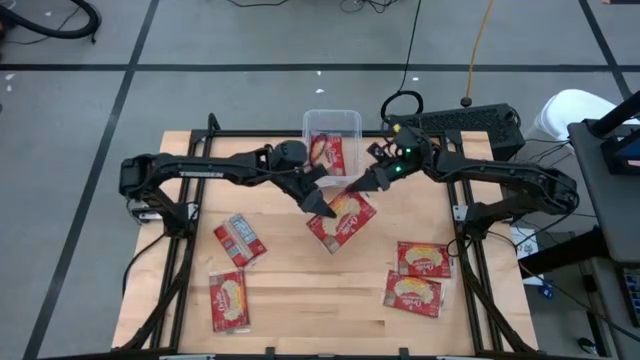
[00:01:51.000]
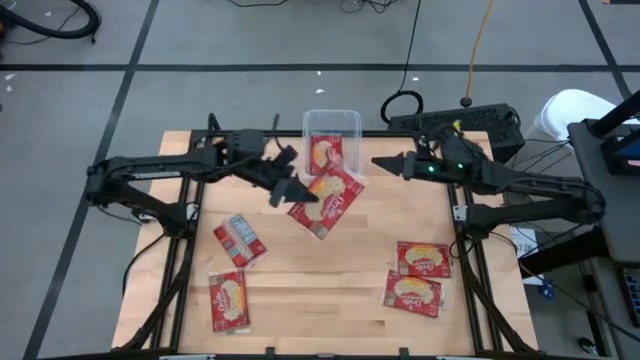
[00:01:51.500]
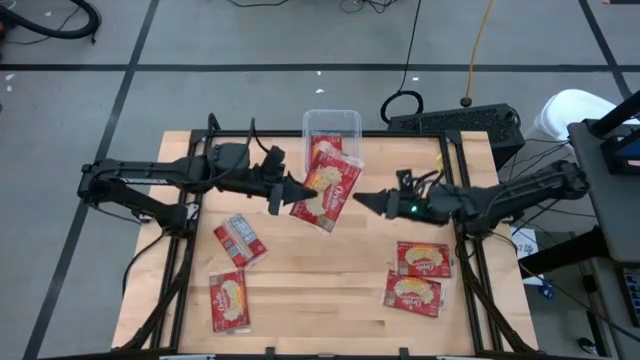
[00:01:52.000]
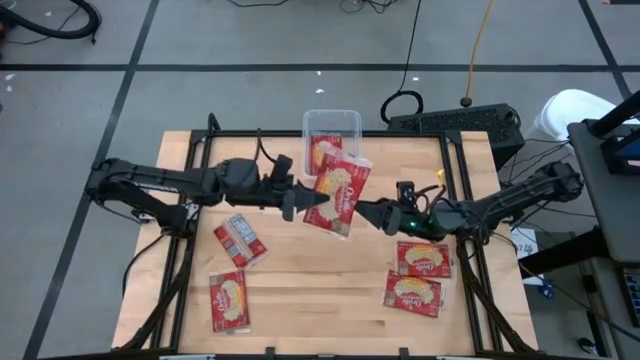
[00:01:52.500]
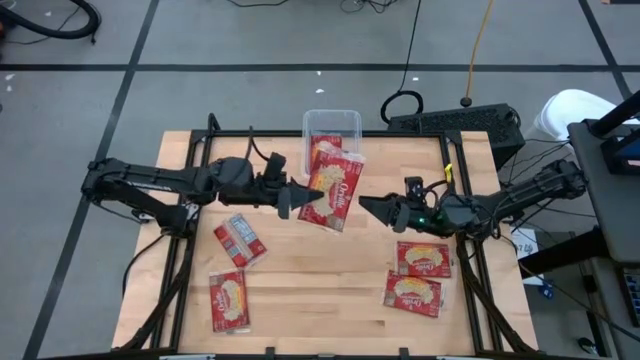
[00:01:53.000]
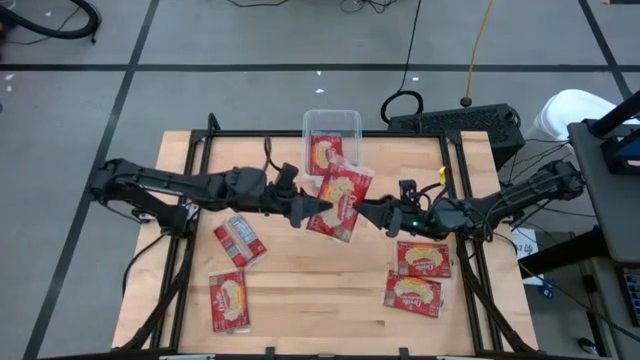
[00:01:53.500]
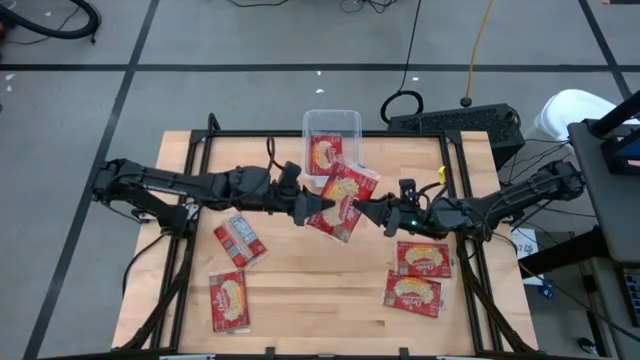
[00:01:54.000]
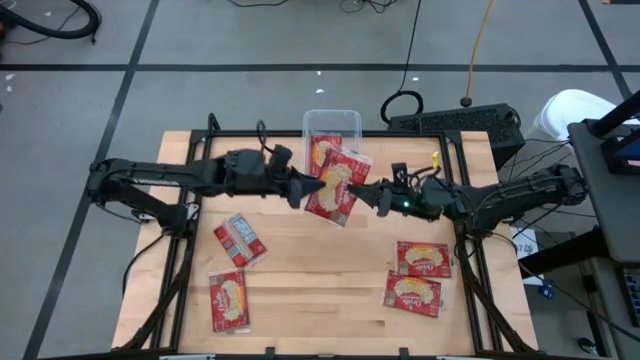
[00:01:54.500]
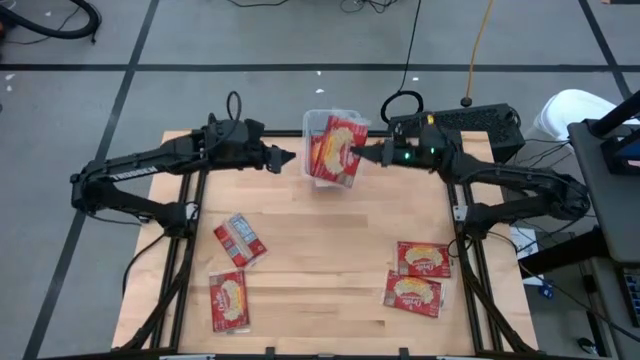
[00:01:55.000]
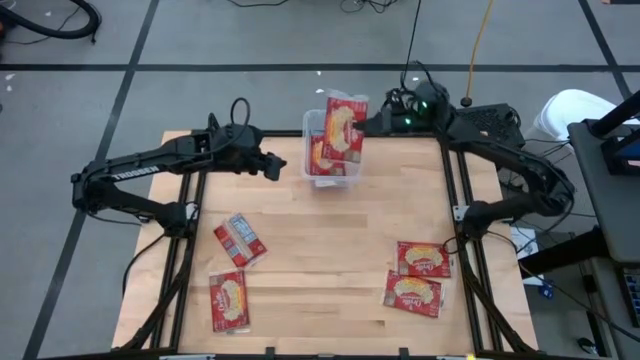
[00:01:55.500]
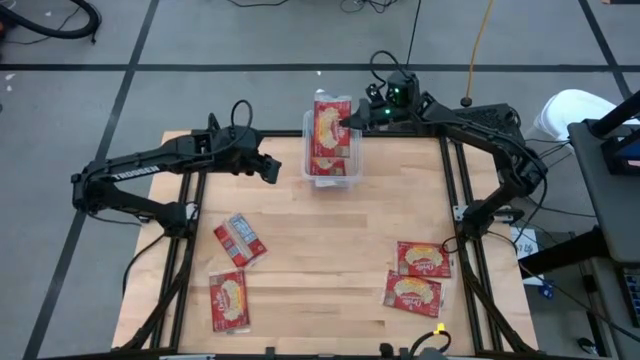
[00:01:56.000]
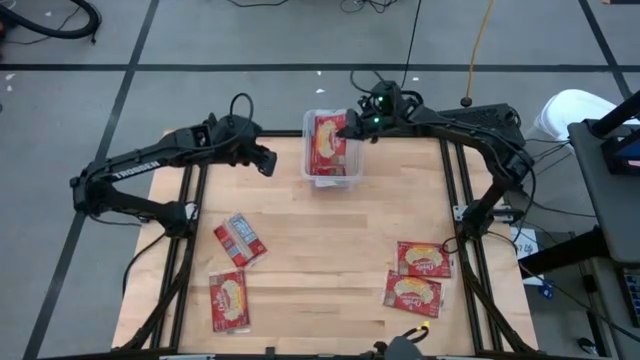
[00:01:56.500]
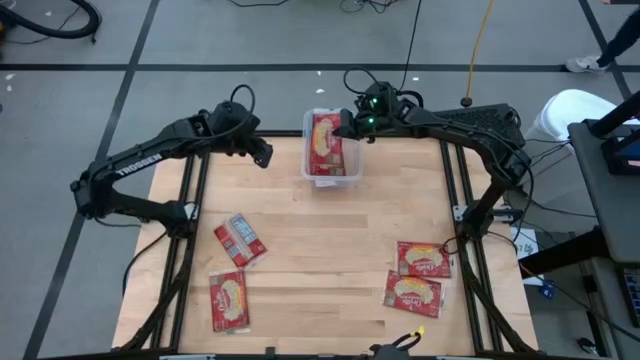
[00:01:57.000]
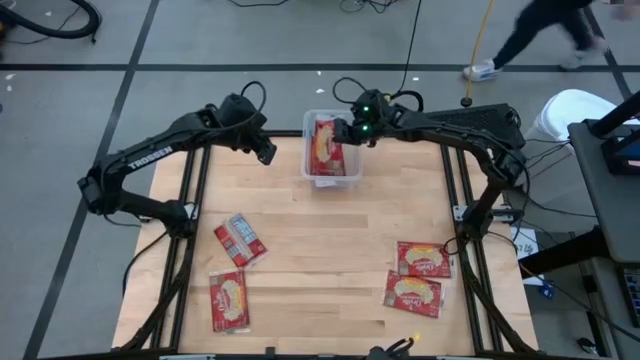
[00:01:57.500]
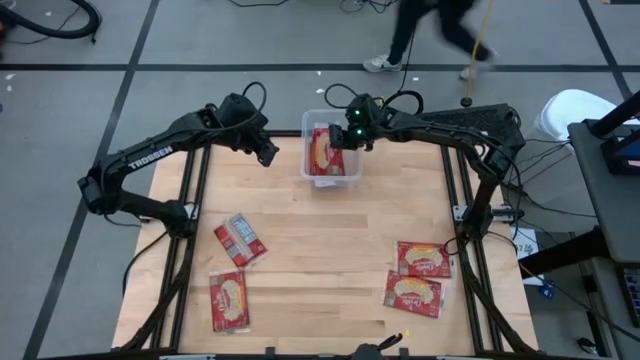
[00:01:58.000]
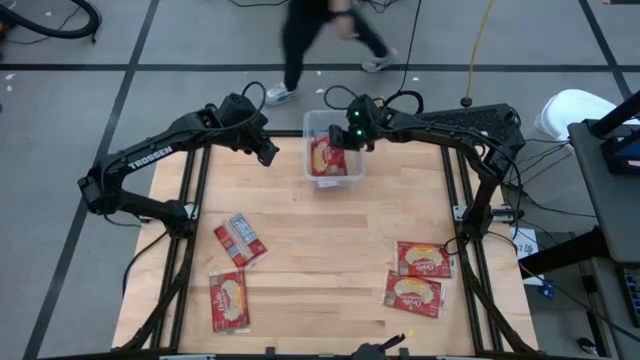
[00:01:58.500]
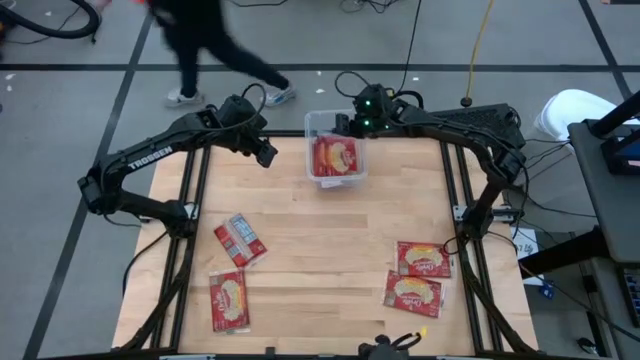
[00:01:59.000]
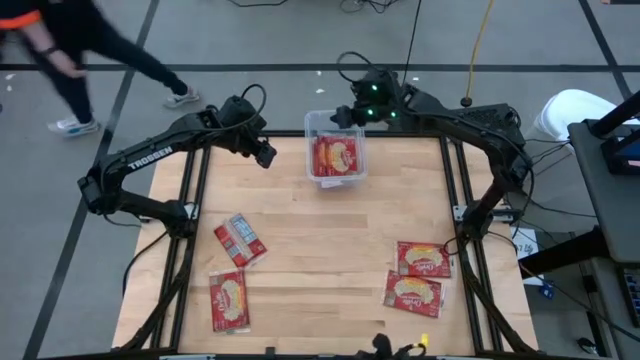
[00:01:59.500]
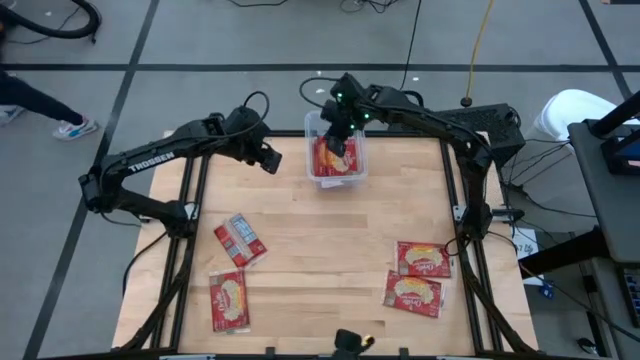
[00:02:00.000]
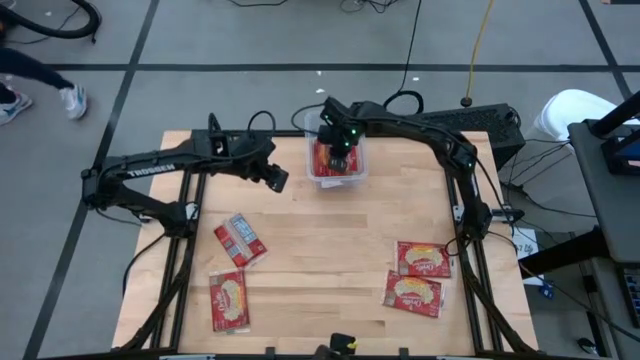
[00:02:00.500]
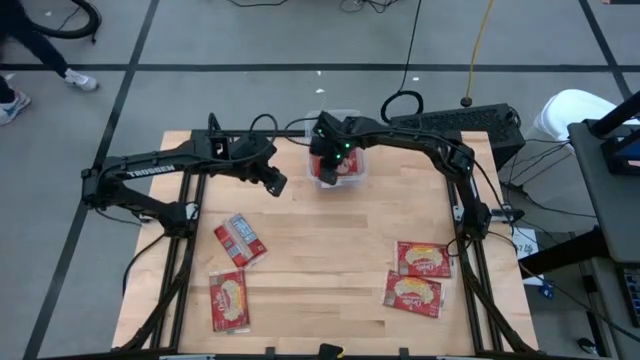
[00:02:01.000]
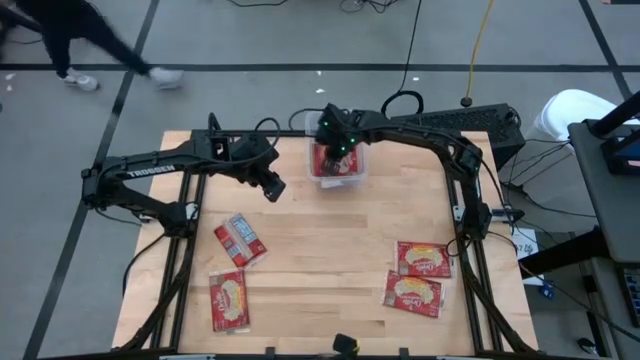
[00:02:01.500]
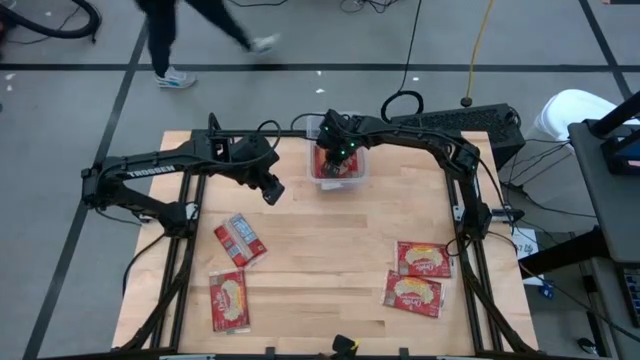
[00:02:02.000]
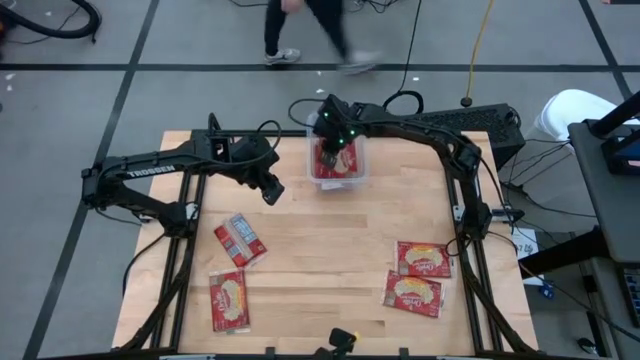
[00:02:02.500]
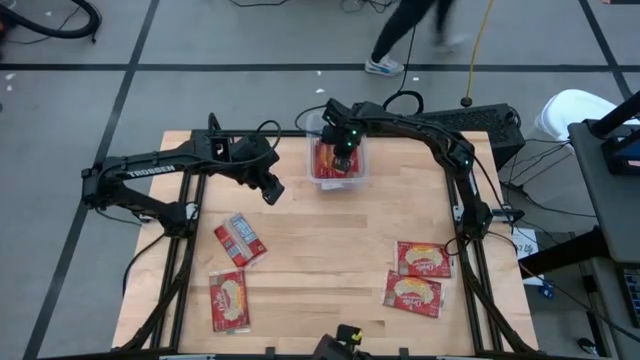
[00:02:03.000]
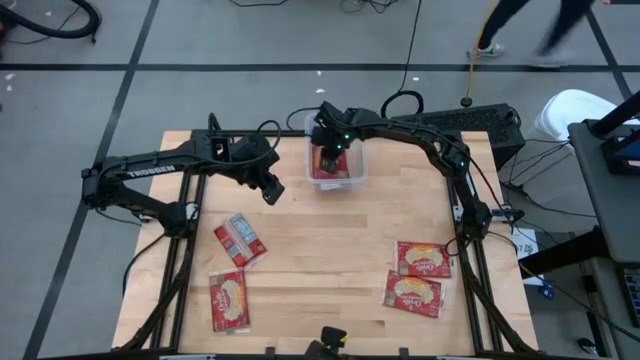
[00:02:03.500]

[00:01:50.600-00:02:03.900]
Task: Sort popcorn bags into baskets
Put the red popcorn bag into the transparent container

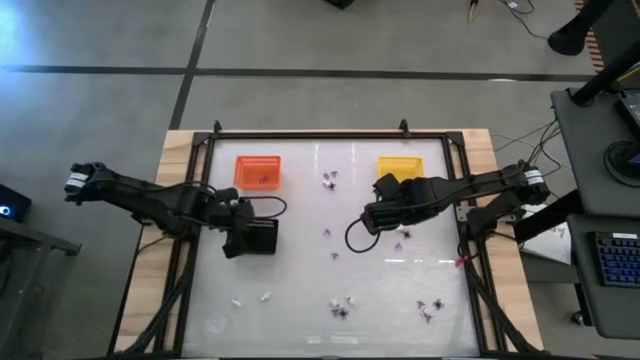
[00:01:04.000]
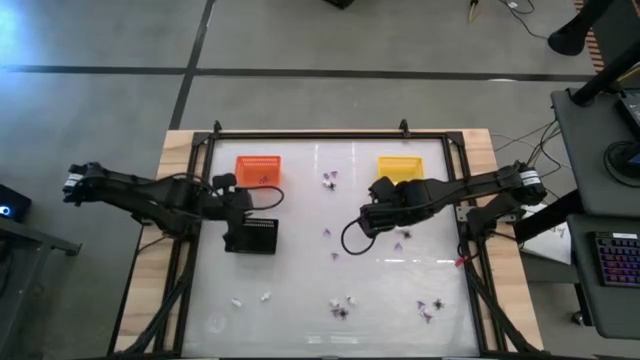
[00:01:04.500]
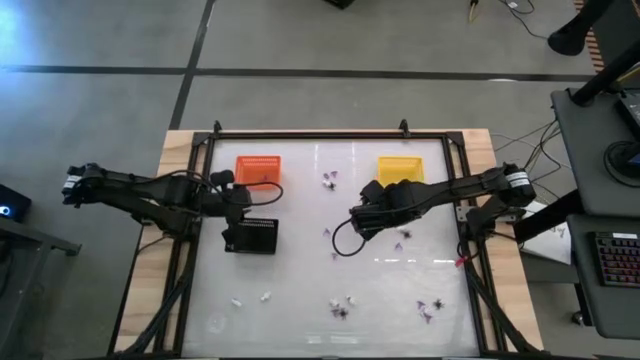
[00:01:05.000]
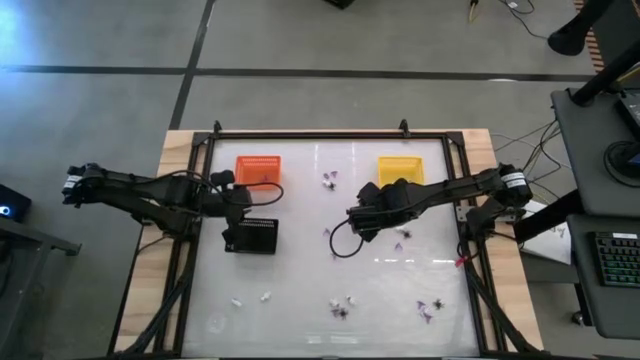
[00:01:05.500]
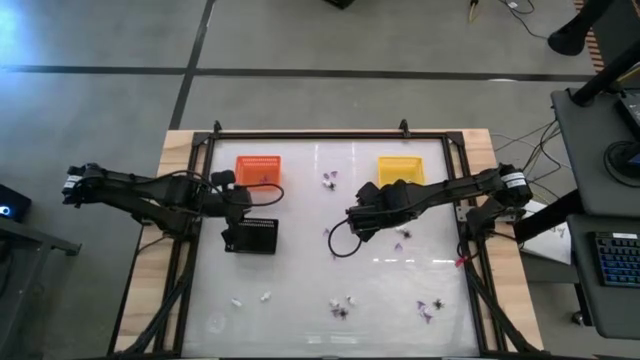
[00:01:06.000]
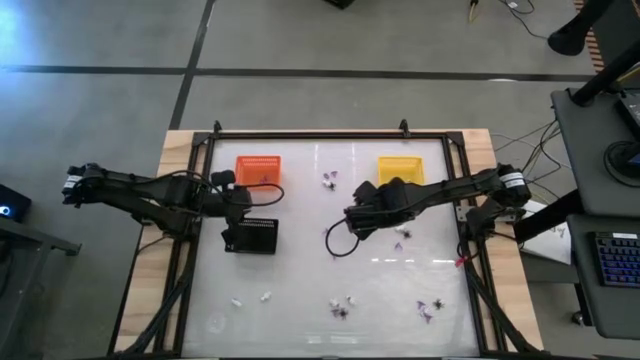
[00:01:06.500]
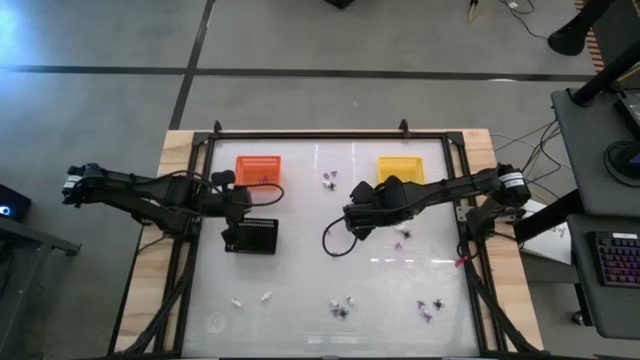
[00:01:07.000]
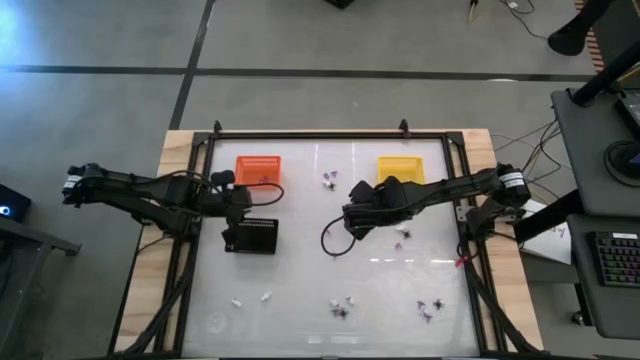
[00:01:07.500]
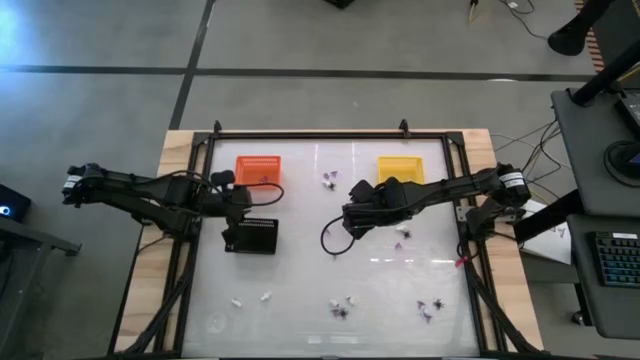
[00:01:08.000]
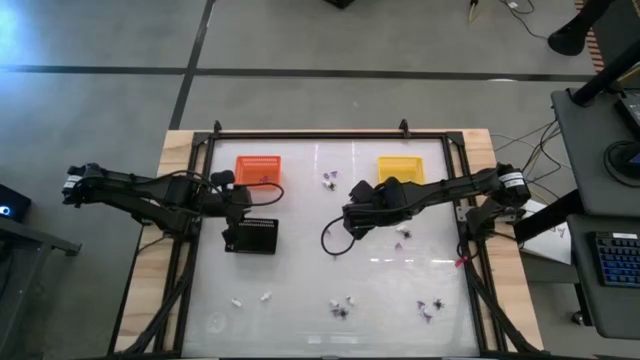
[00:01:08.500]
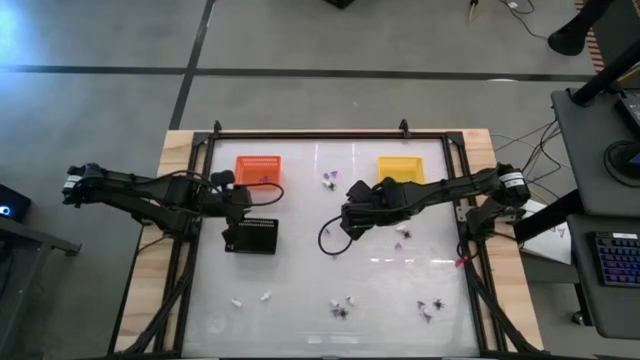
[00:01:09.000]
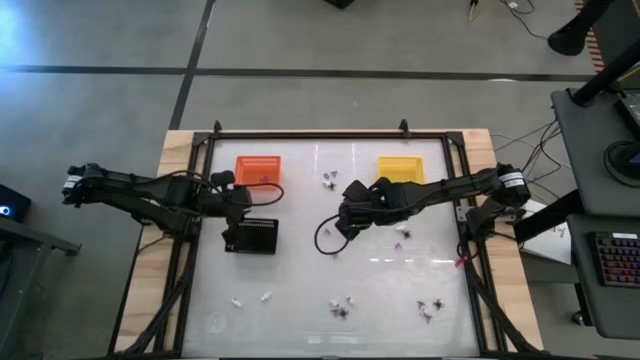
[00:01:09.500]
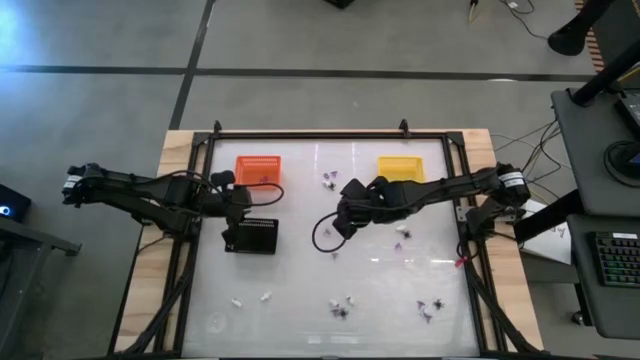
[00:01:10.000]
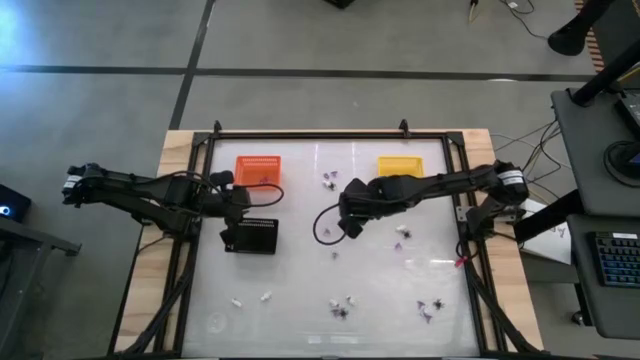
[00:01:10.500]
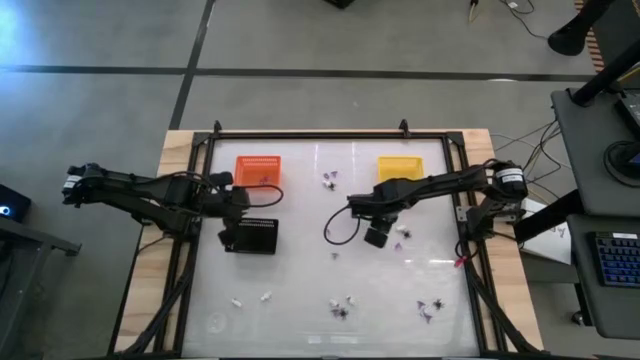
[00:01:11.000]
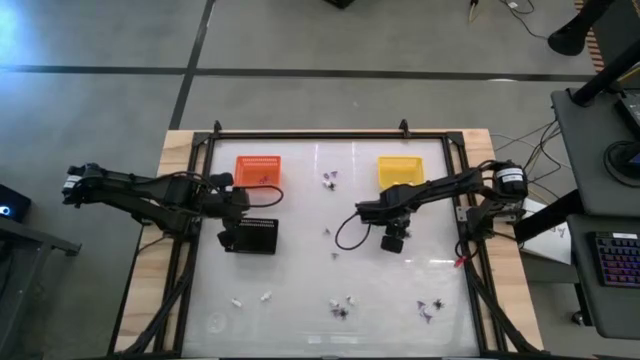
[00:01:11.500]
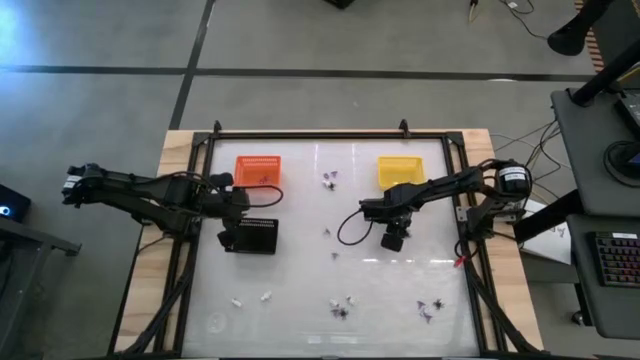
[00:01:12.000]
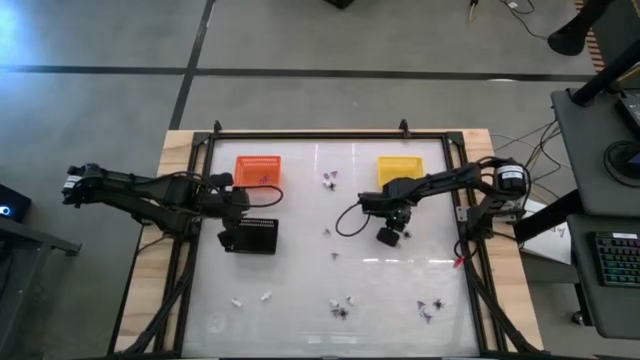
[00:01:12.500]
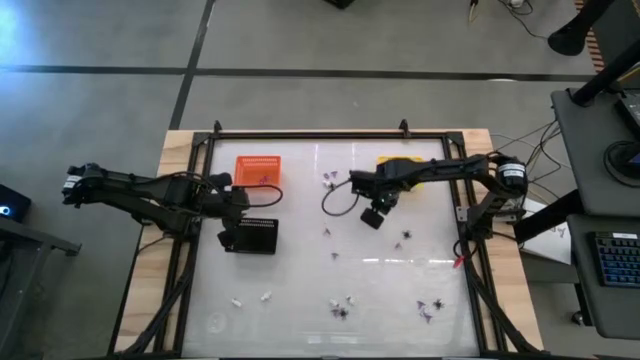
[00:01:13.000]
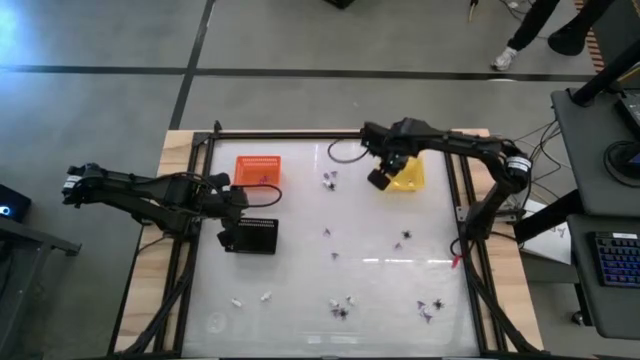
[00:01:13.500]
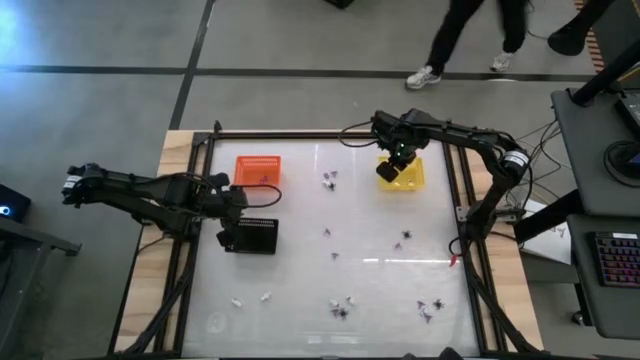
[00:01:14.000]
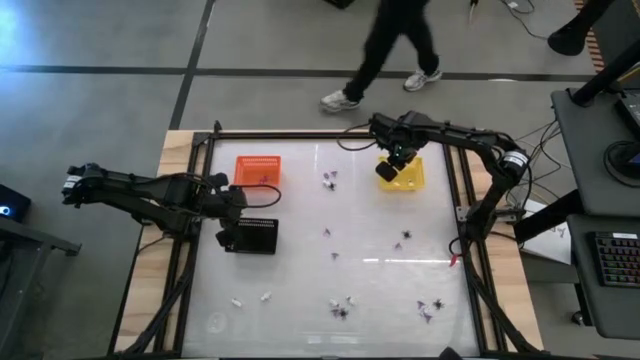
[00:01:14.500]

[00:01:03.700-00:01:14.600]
Task: Sort Halloween decoration
Put the white skeleton toy into the yellow bin
